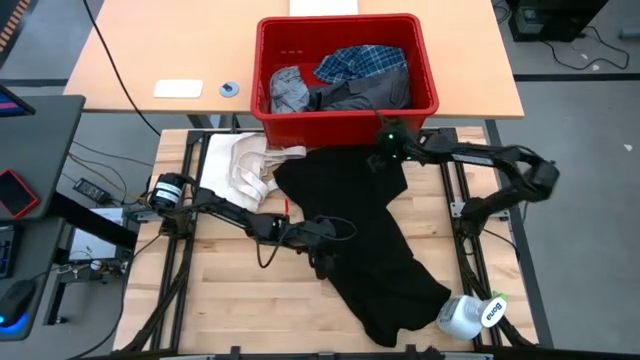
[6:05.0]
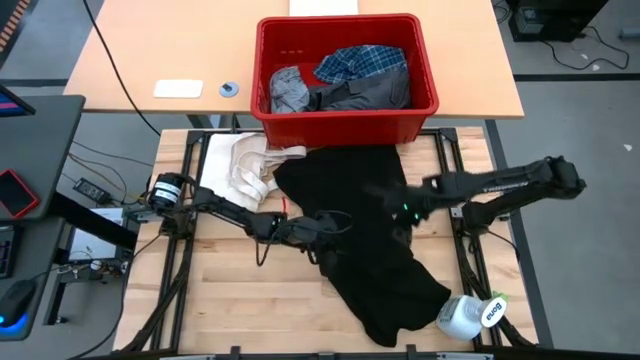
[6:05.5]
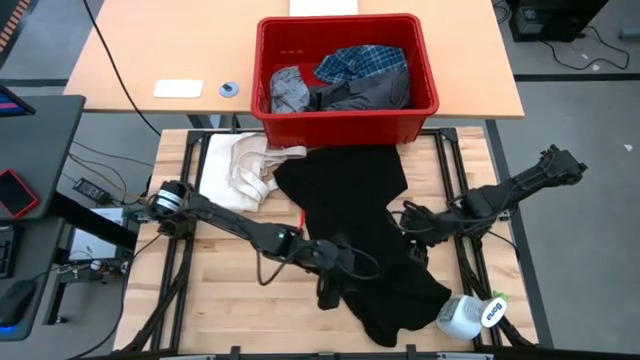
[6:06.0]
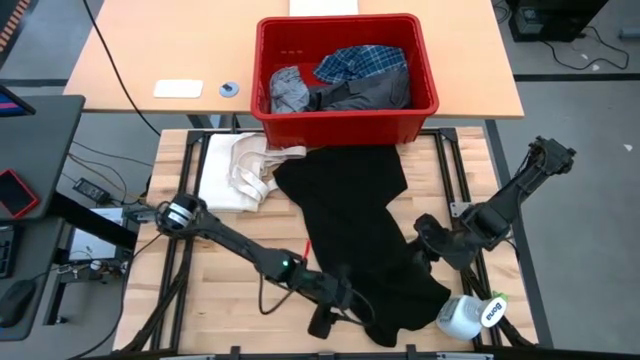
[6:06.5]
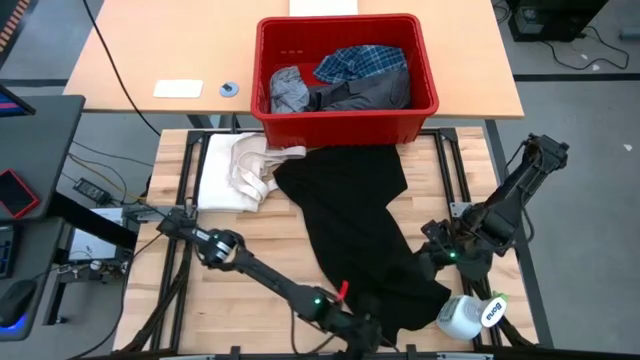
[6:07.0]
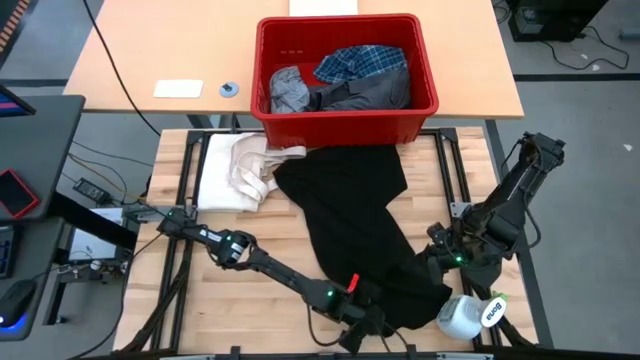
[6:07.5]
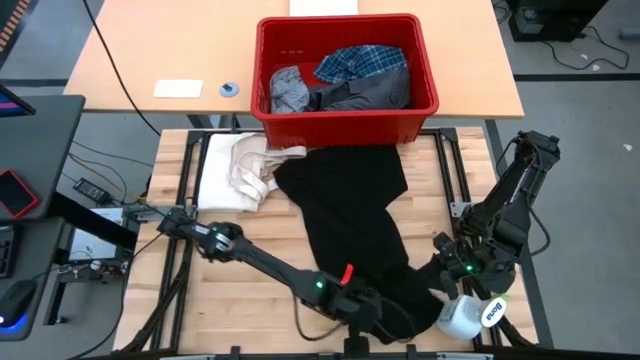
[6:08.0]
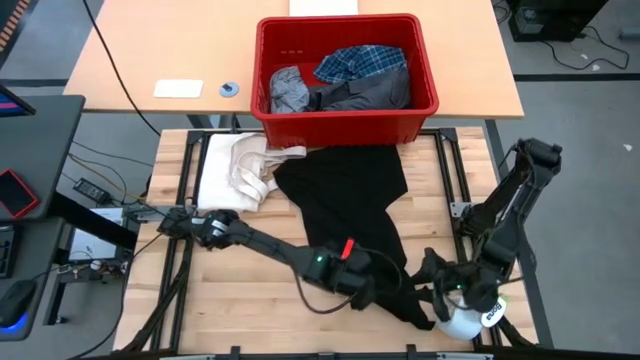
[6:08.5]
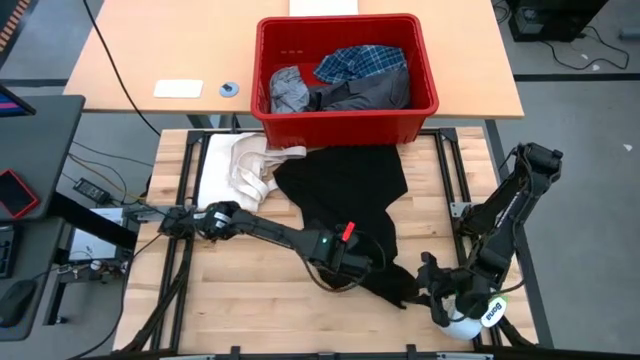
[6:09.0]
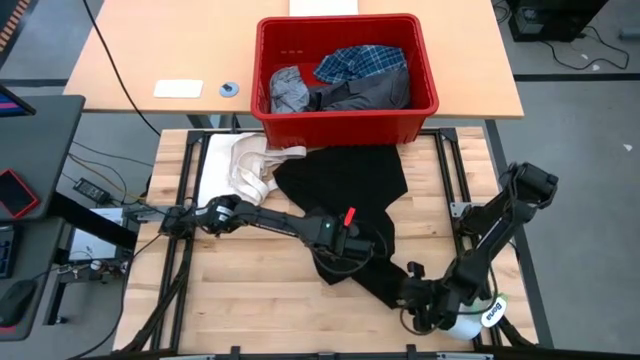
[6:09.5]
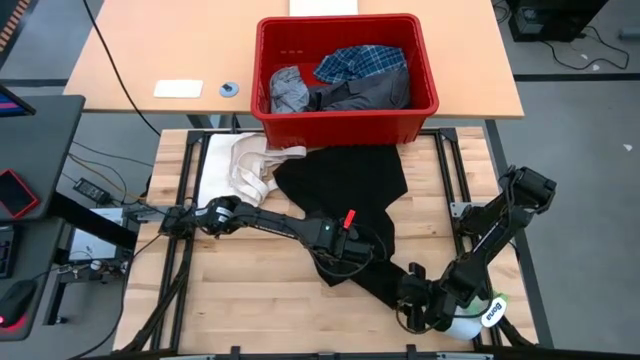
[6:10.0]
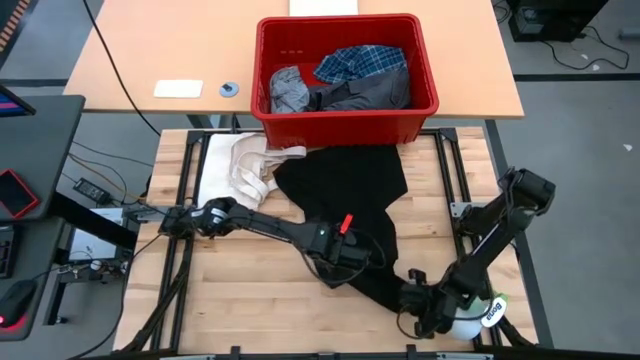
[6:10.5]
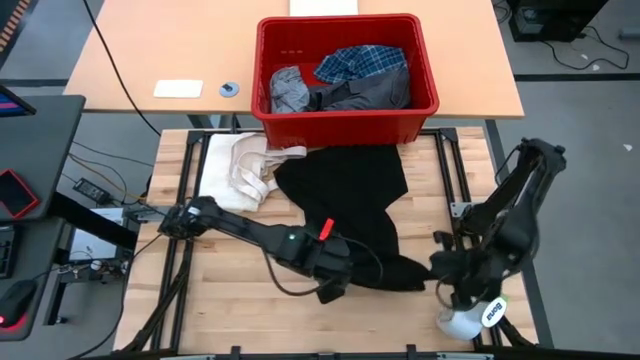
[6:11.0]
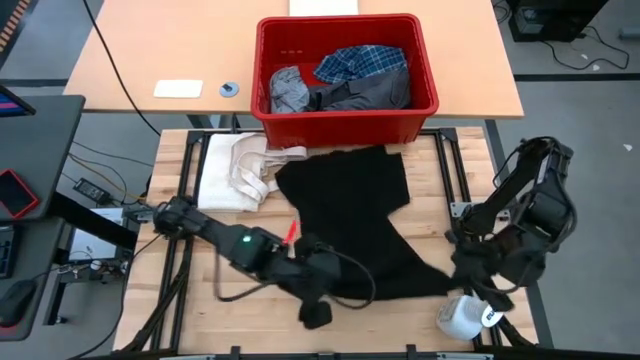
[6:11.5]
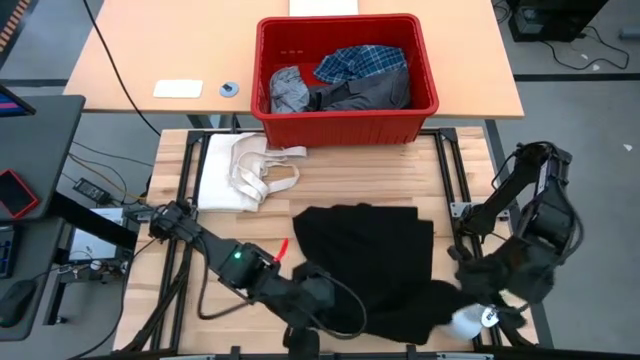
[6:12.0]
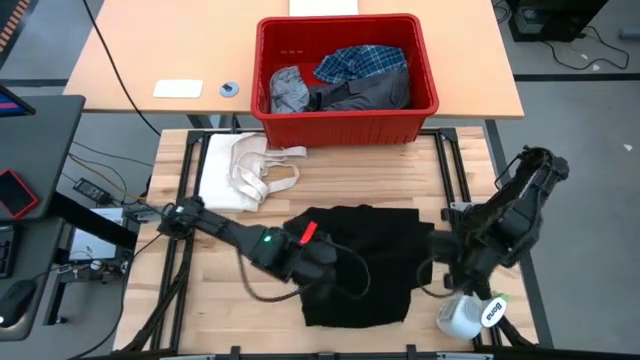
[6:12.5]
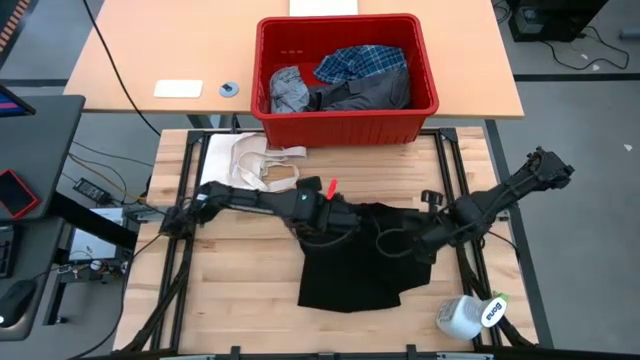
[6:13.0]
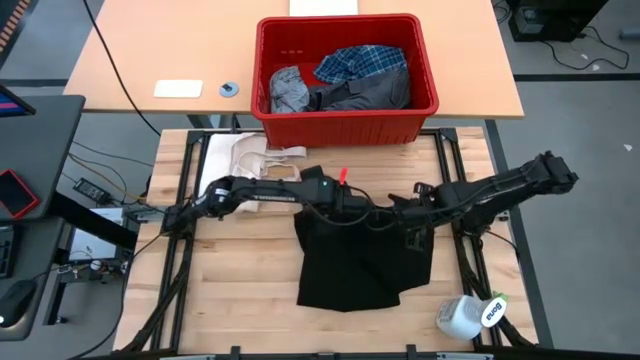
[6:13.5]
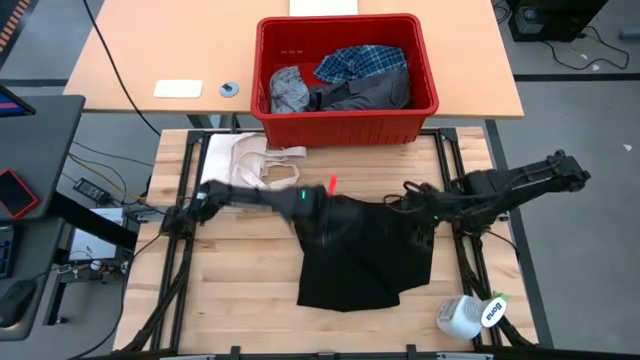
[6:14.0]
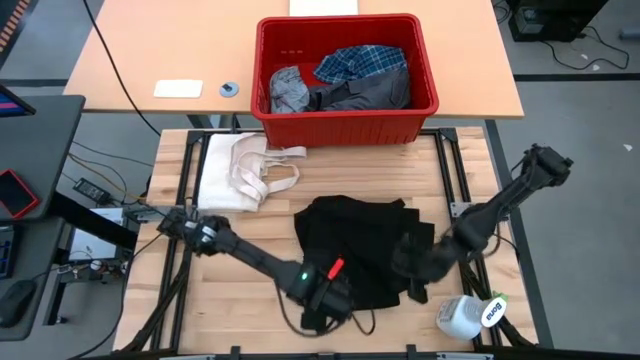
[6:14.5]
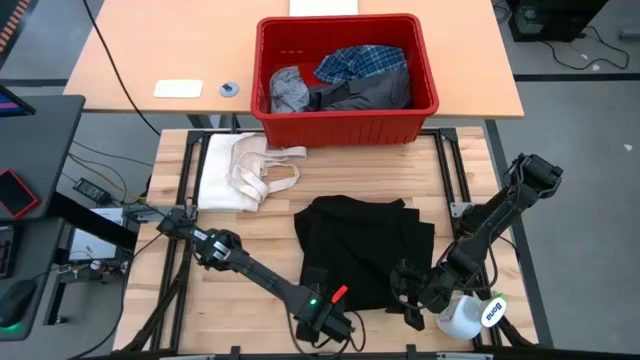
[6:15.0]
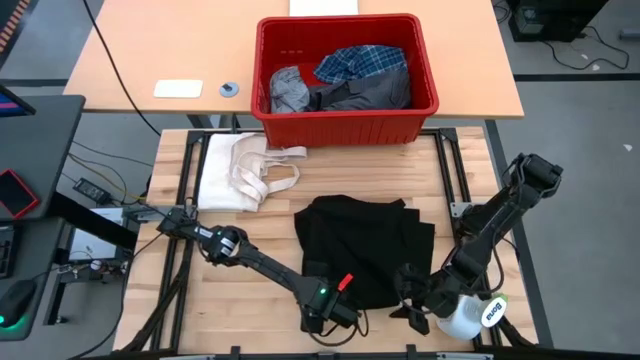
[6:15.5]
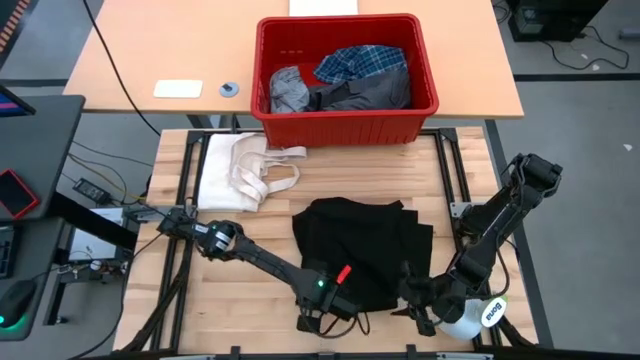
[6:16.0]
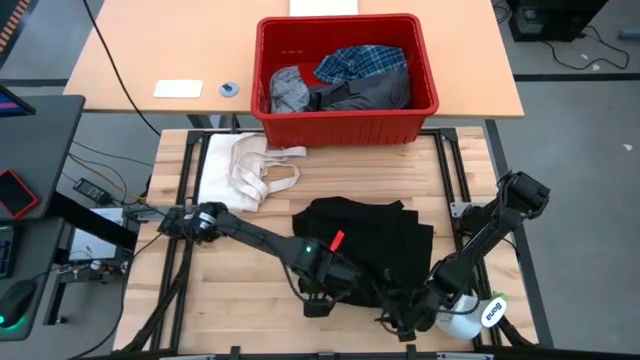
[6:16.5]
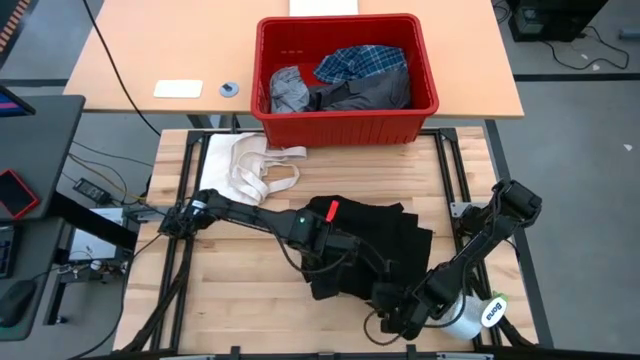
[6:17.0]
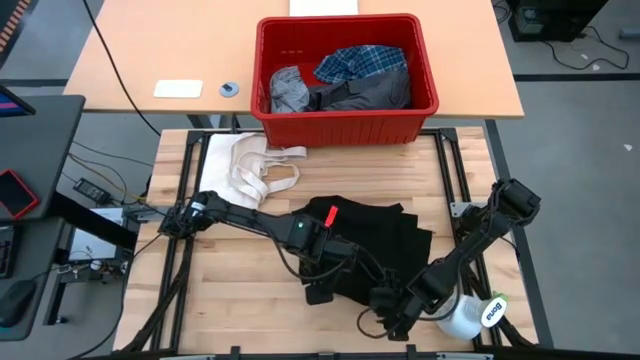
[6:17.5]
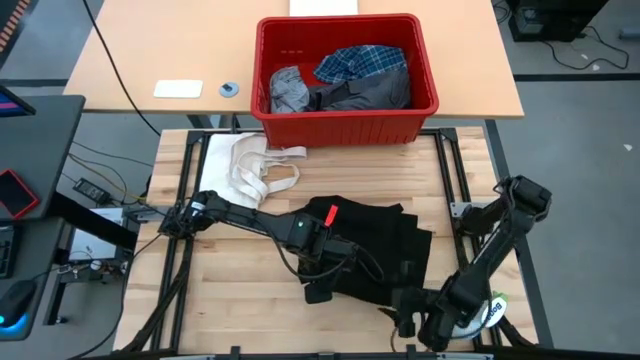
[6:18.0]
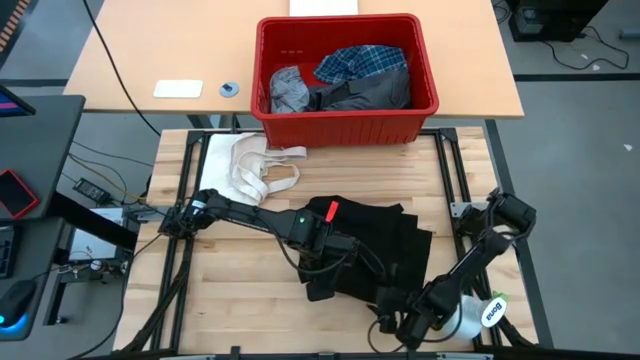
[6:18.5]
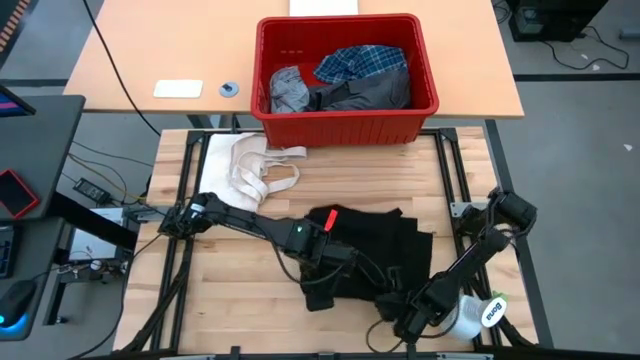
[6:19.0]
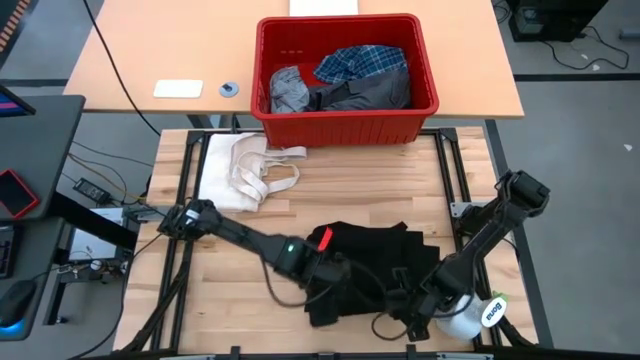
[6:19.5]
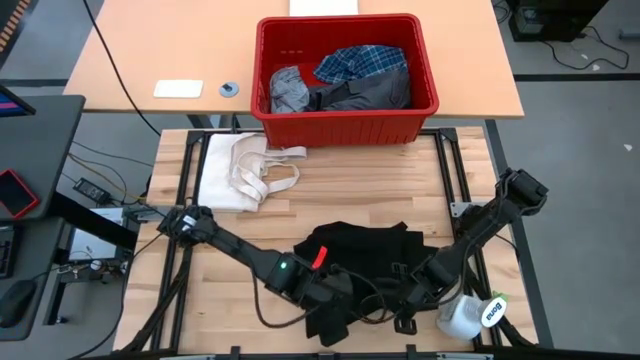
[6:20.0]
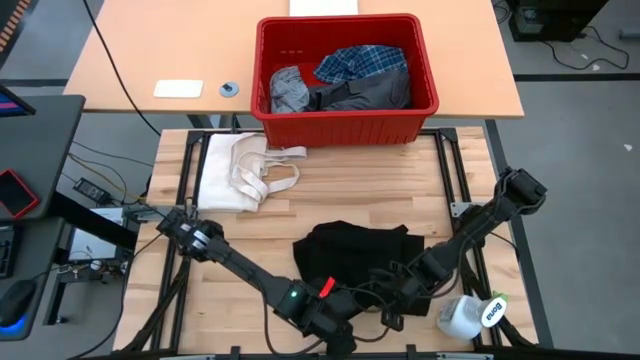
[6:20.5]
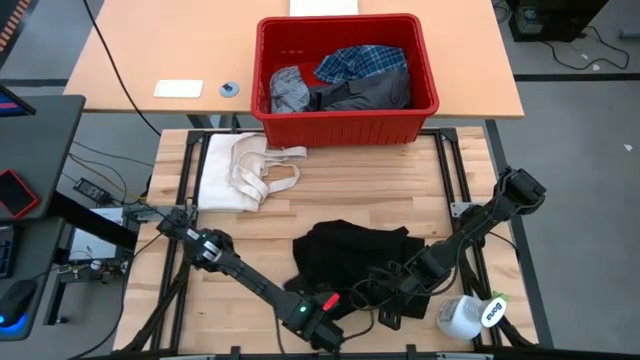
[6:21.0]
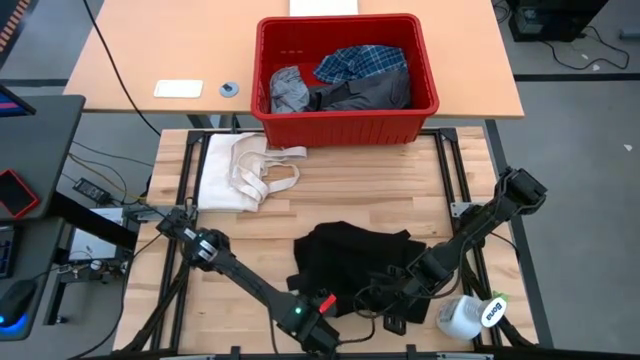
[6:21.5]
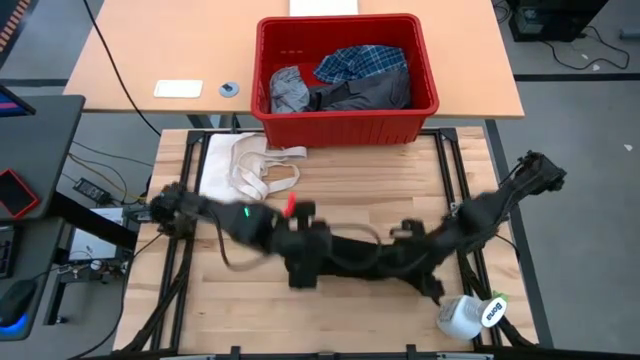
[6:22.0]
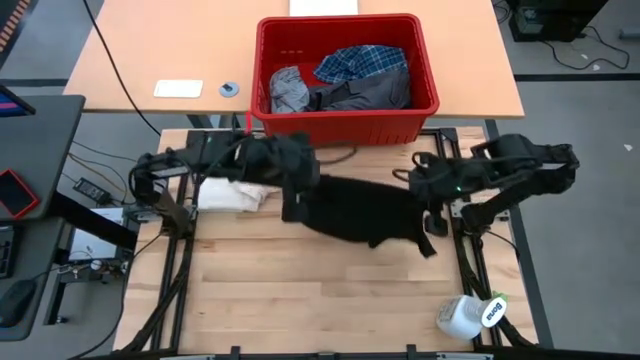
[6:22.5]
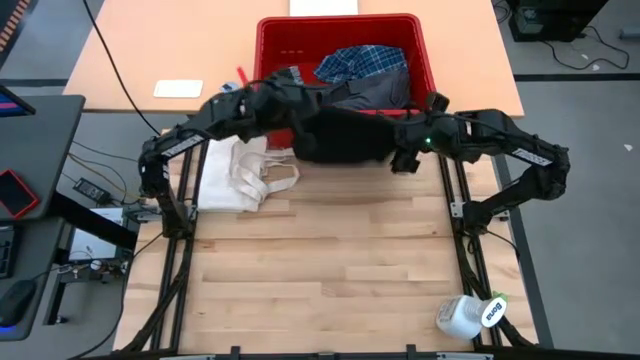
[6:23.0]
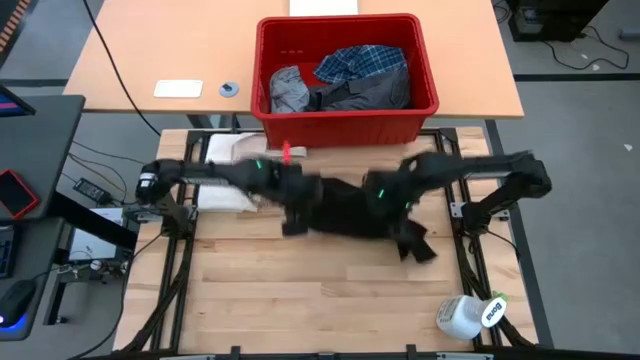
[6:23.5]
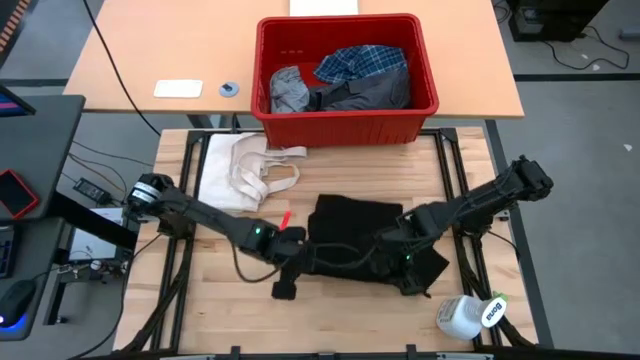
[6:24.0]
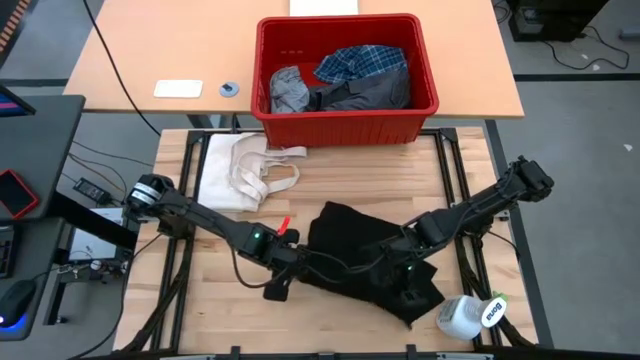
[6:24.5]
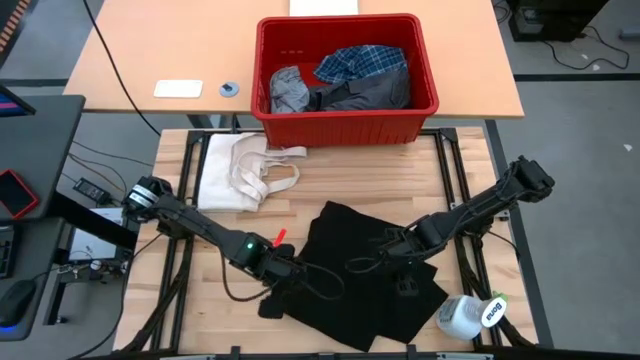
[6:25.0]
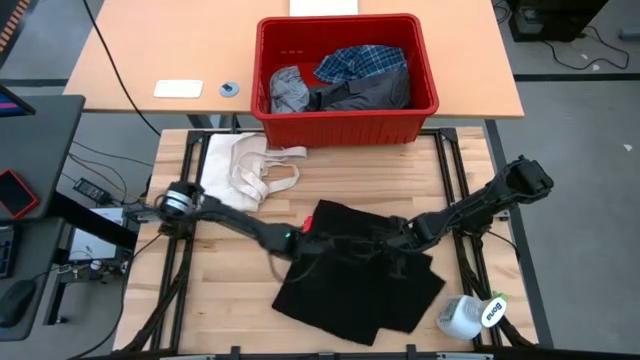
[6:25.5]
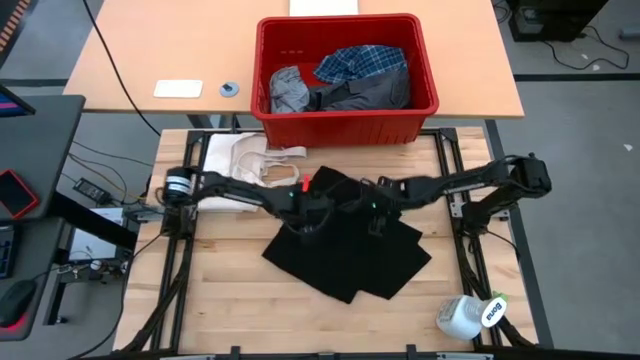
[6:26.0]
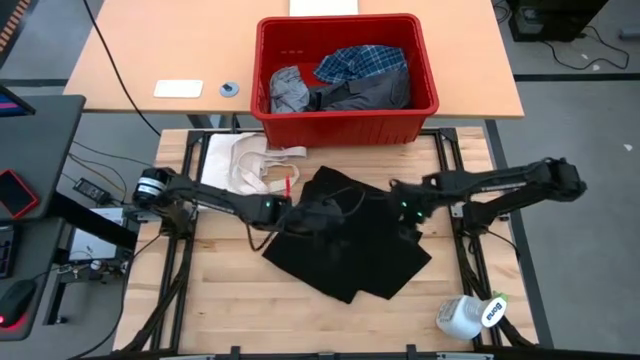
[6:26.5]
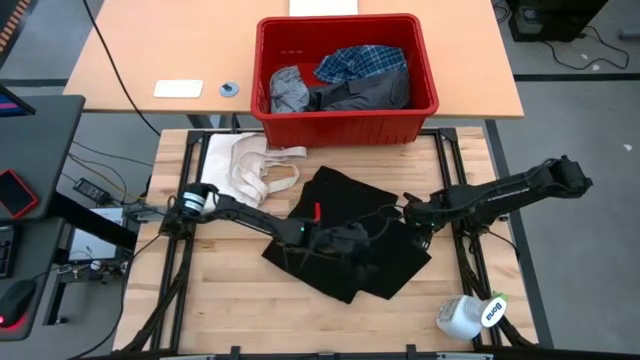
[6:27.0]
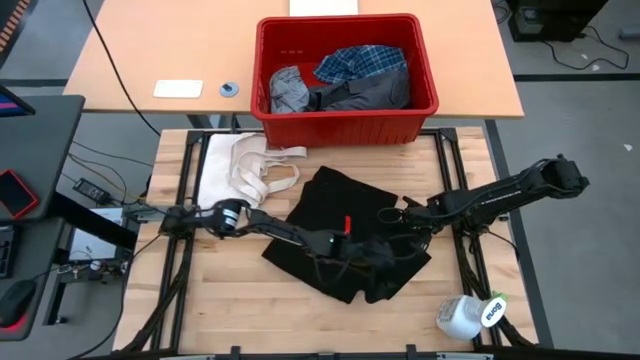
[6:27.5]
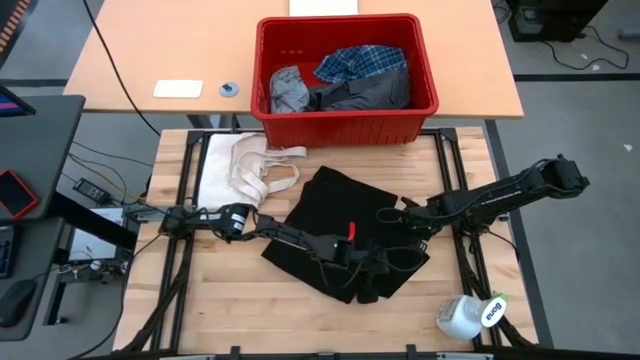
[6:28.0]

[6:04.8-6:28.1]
Task: Fold Laundry from Bin
Fold the black shirt
